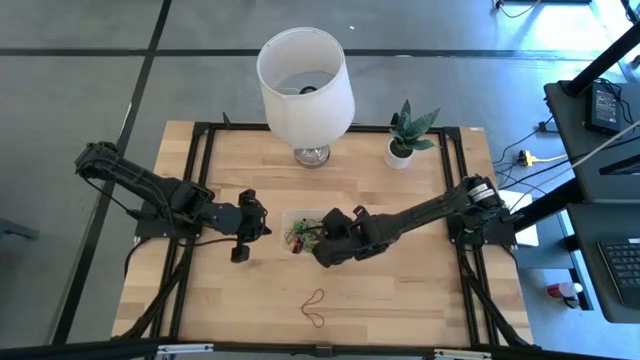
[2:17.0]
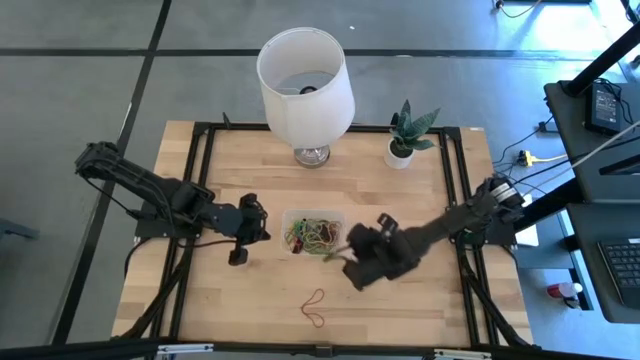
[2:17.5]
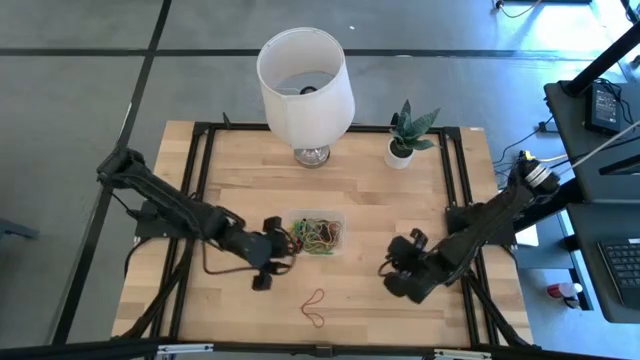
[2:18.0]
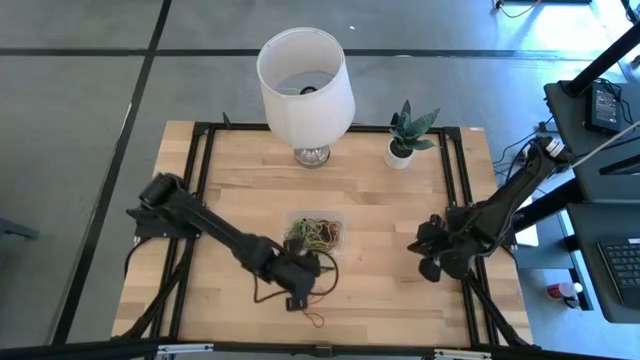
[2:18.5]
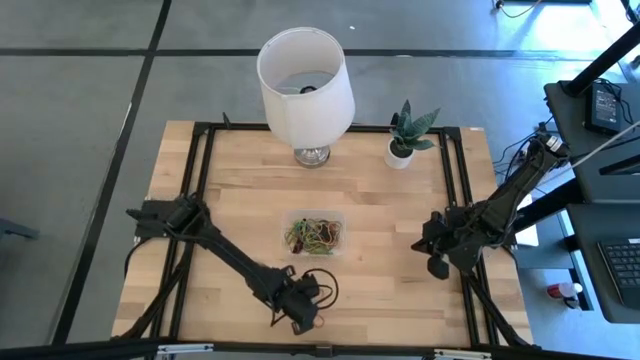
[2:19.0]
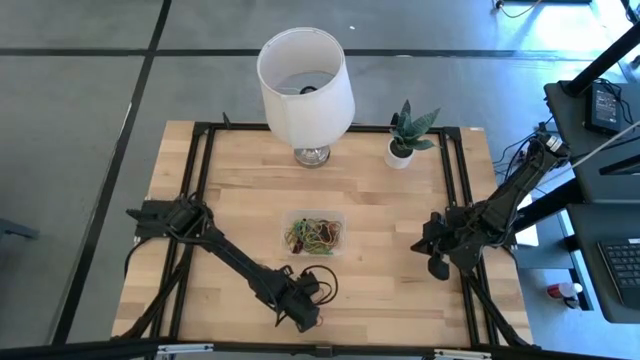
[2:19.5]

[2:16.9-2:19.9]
Task: Pick and place rubber bands into bin
Put the red rubber band into the transparent bin

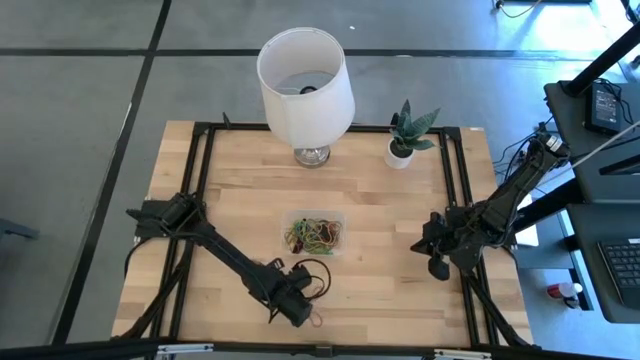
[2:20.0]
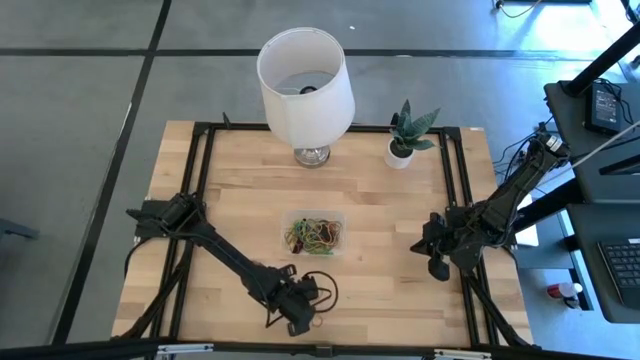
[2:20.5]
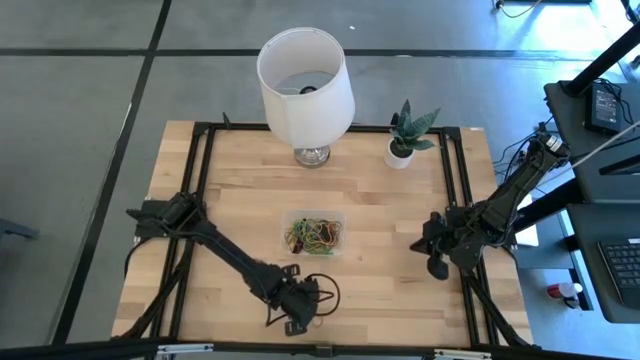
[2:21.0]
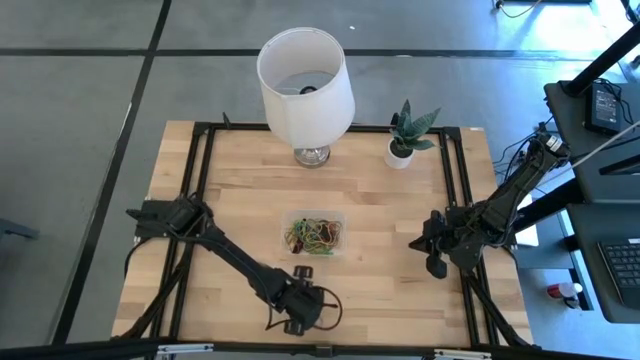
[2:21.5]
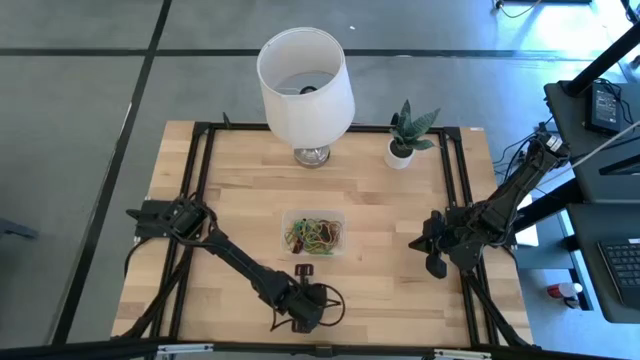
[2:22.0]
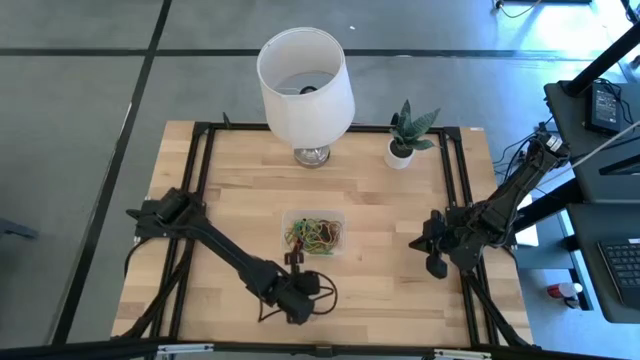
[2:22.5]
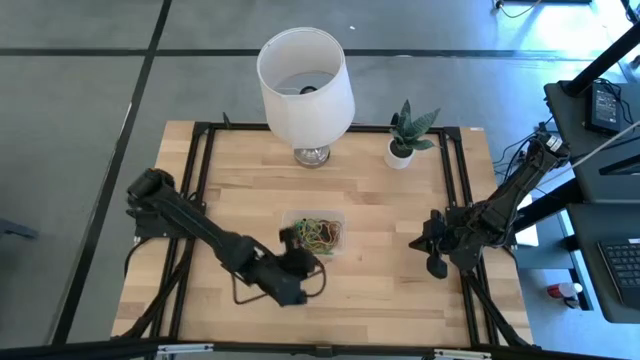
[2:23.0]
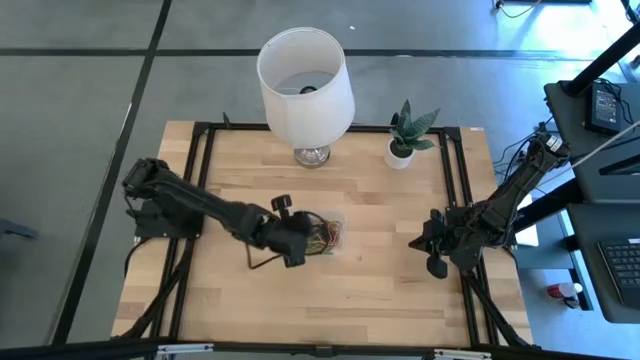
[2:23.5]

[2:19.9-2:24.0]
Put the red rubber band into the transparent bin

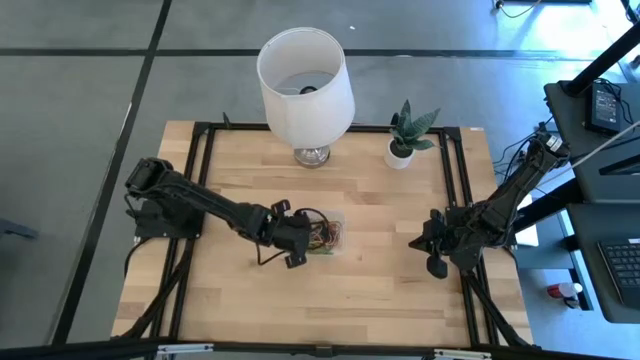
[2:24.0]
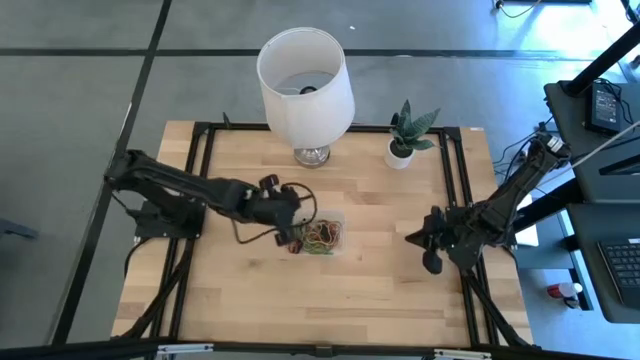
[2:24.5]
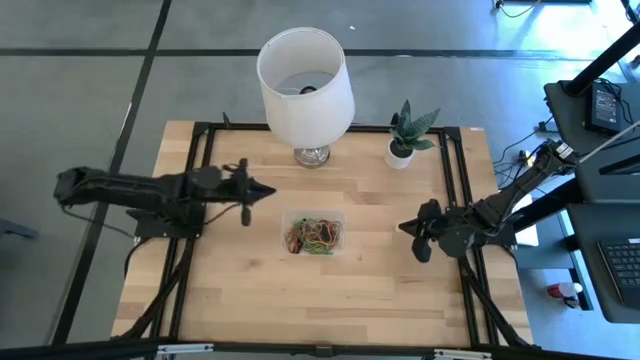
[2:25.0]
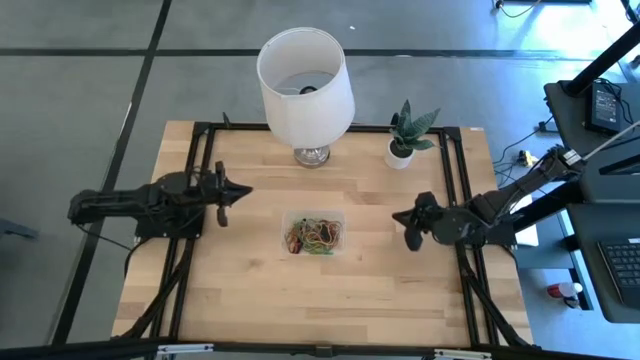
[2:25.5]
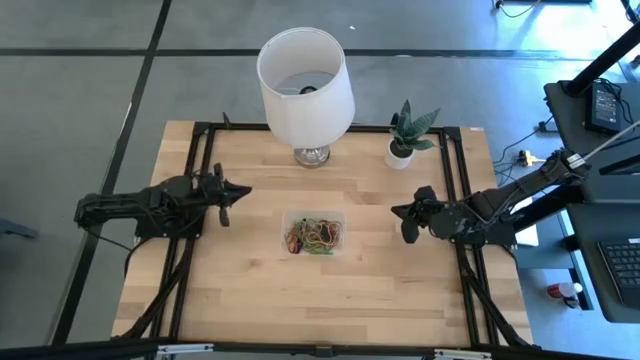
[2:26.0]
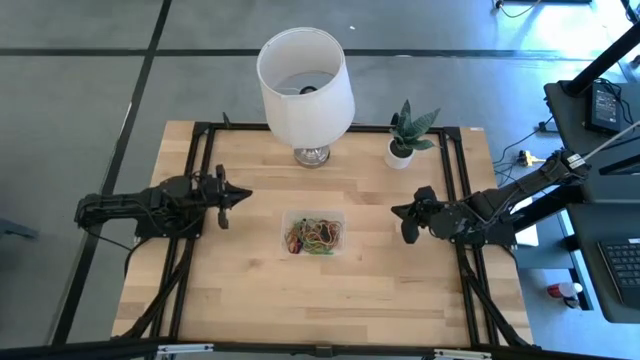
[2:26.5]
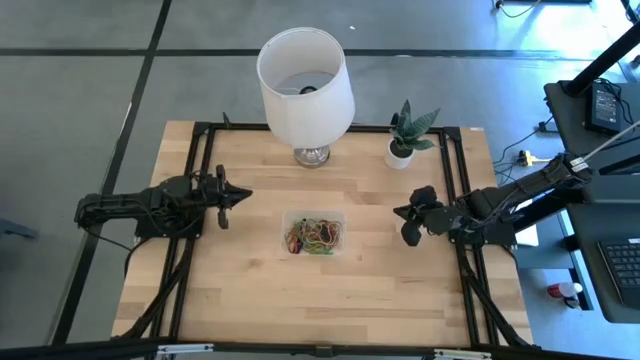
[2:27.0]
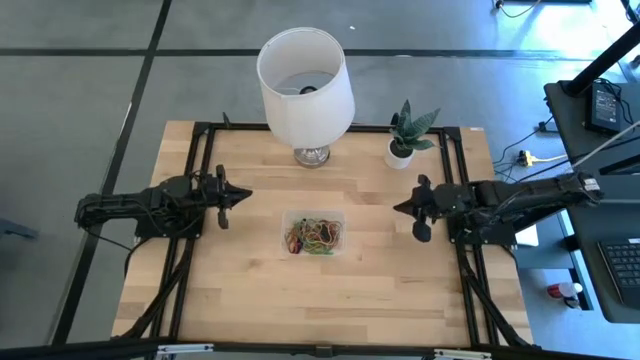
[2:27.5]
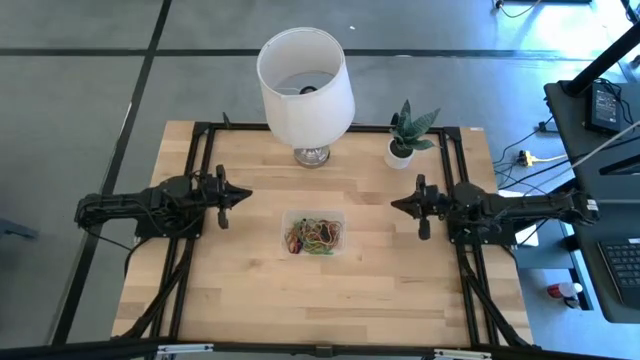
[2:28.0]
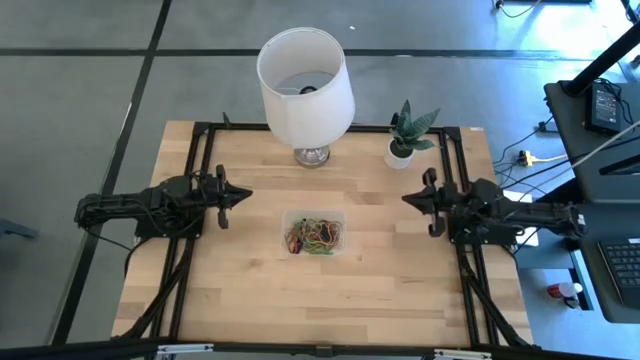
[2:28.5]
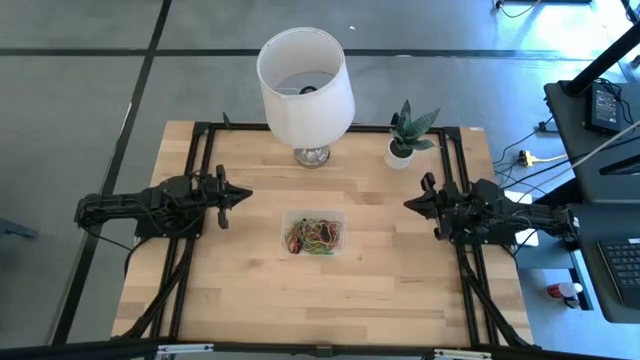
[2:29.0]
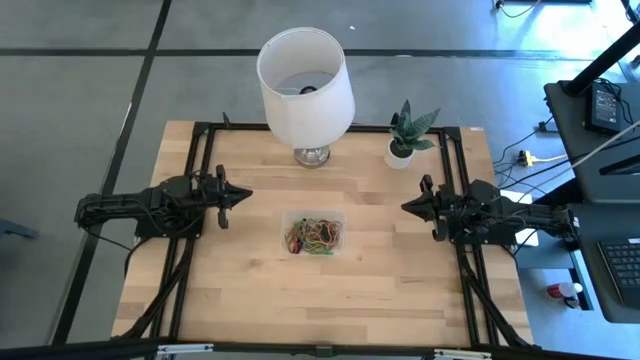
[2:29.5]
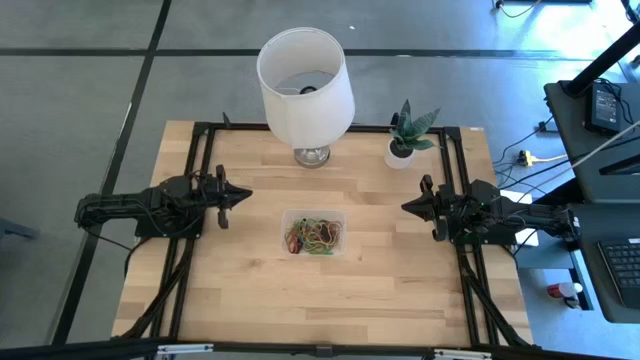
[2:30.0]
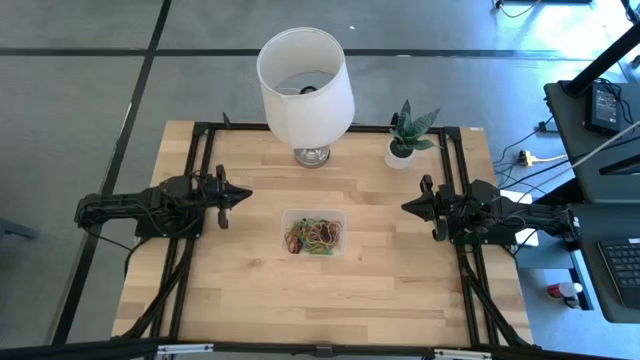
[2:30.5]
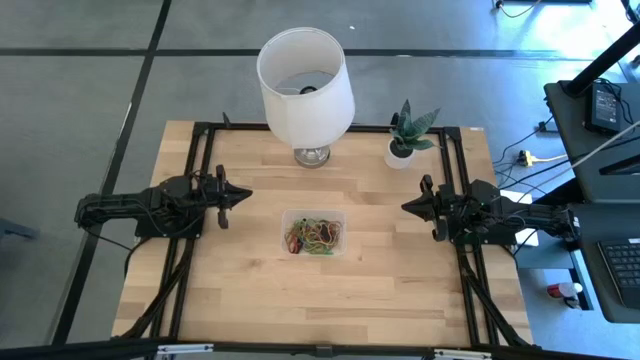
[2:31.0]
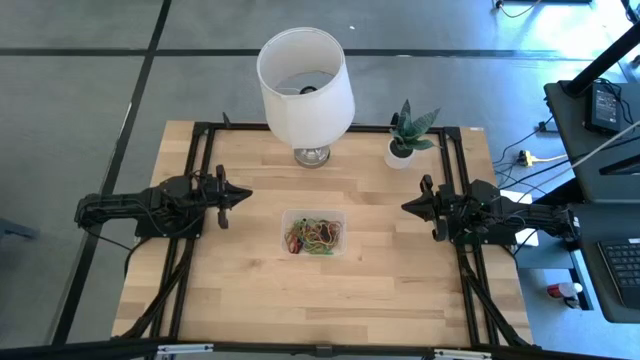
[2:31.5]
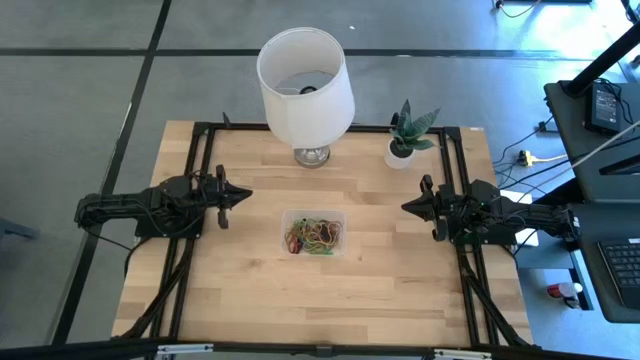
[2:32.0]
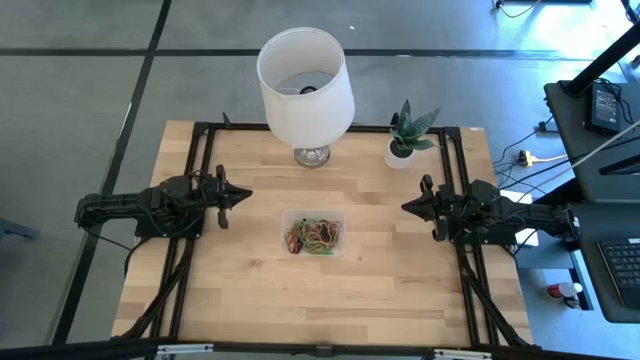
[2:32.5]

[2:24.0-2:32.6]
Return to Home Position

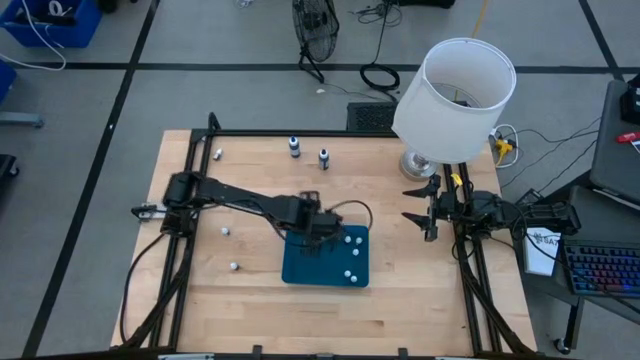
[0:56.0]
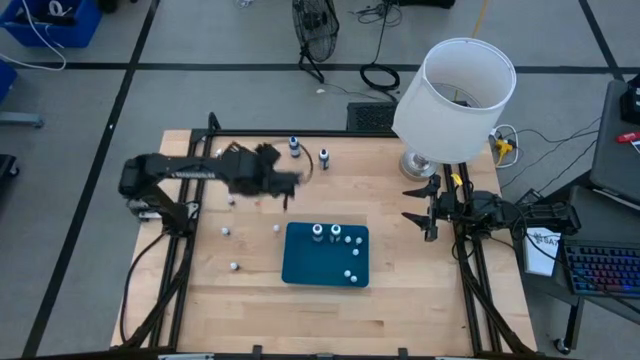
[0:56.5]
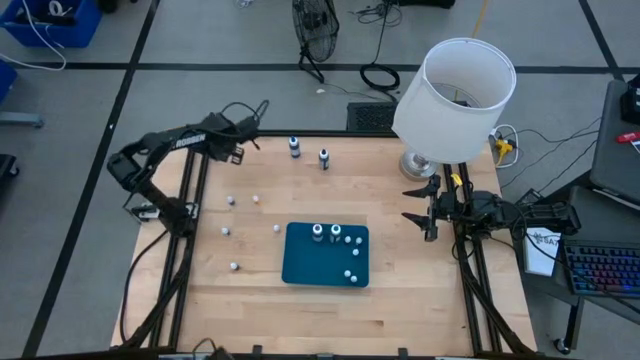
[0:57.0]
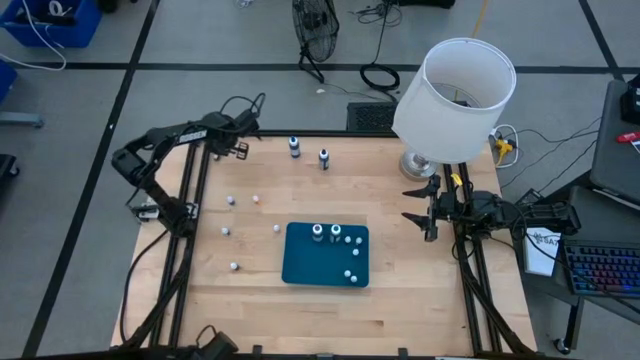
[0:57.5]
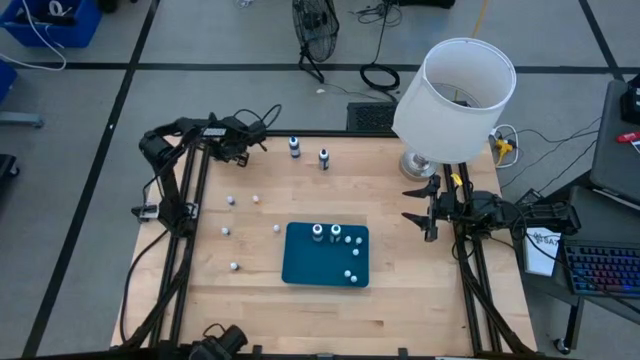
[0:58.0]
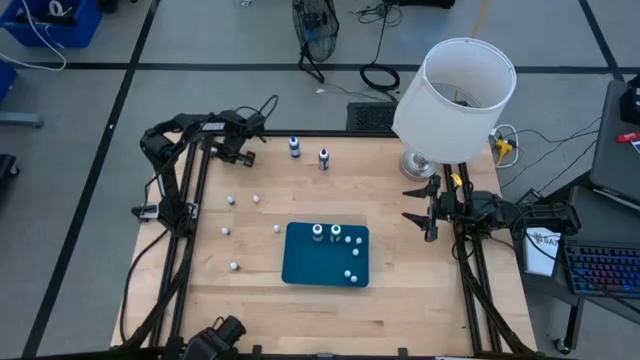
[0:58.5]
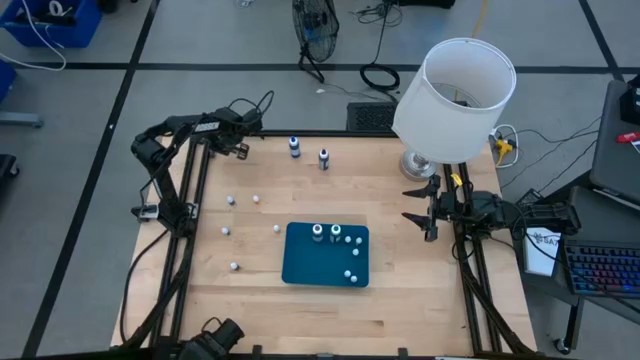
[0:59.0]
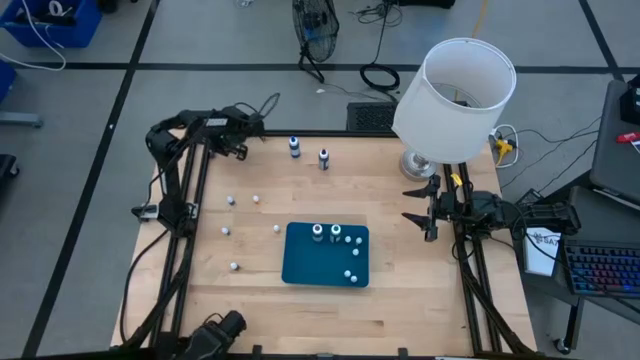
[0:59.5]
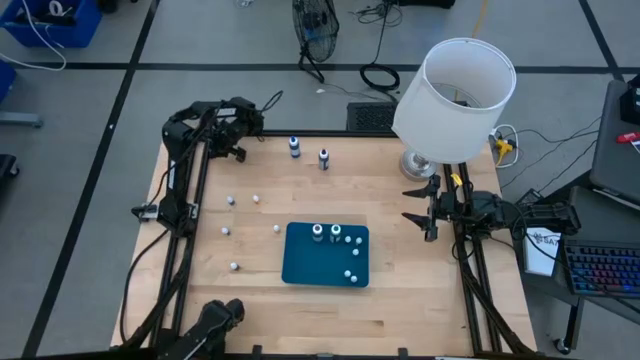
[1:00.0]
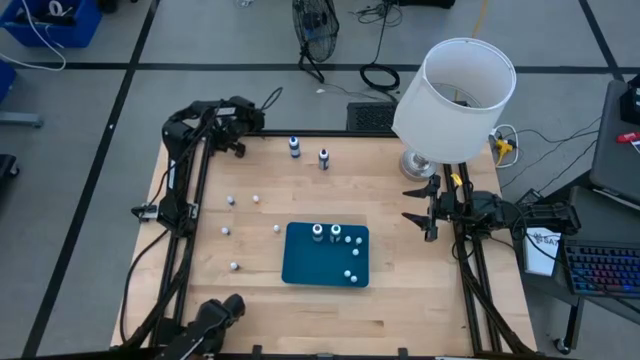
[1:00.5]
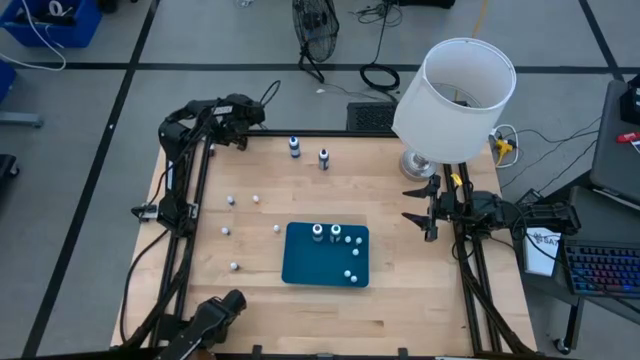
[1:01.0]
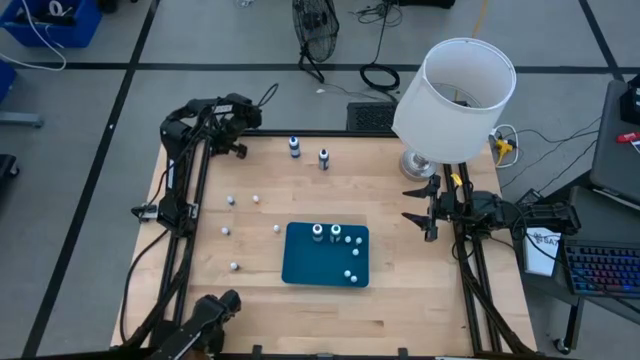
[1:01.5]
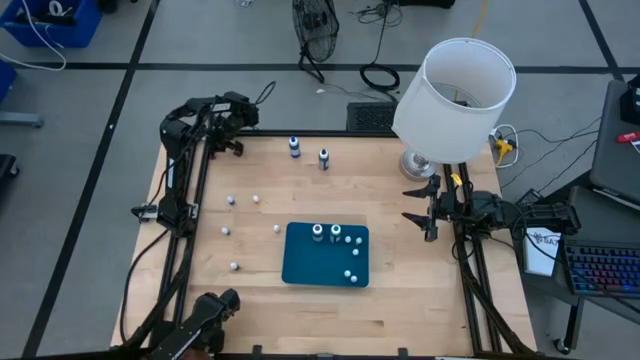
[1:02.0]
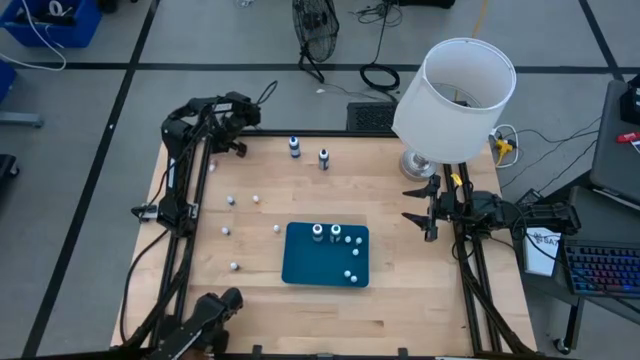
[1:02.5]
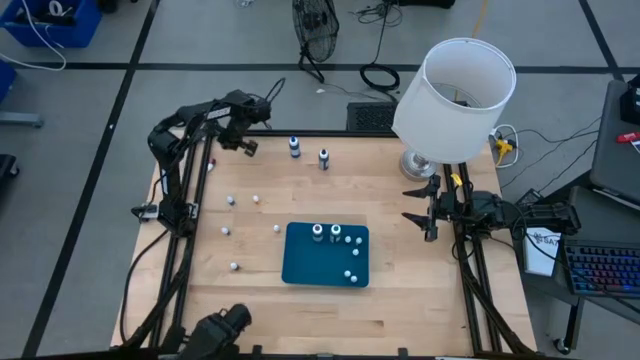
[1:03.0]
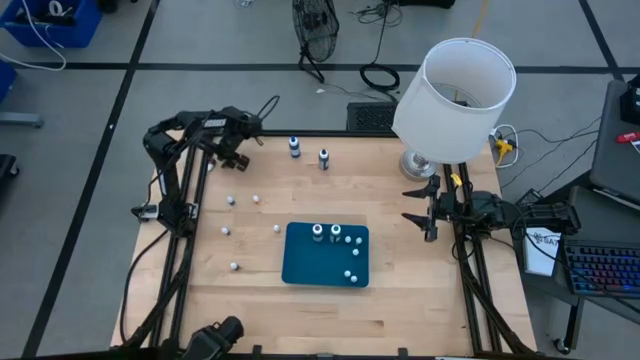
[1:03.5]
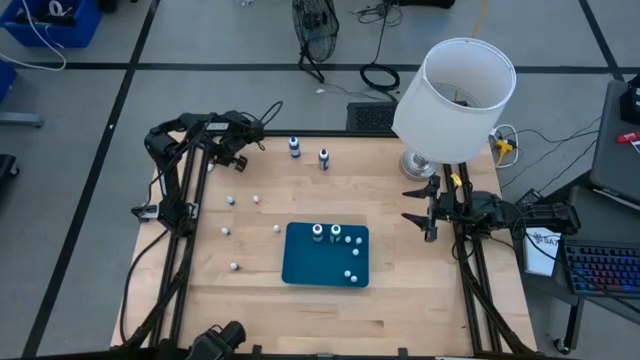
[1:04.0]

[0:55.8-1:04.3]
Task: Pick & Place food coloring
Put the small red food coloring bottle into the blue bin
